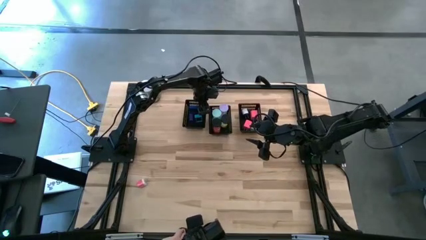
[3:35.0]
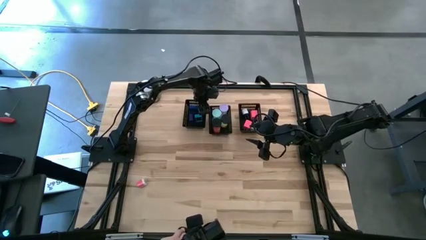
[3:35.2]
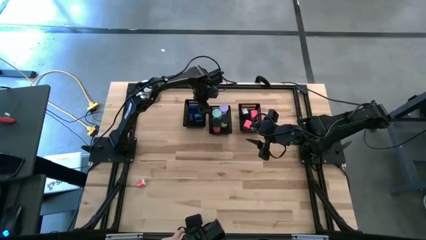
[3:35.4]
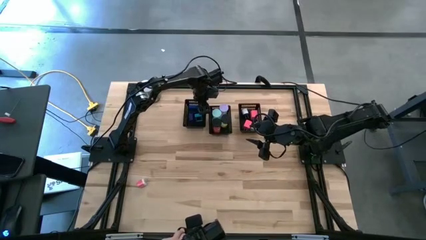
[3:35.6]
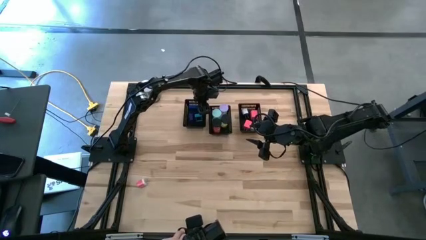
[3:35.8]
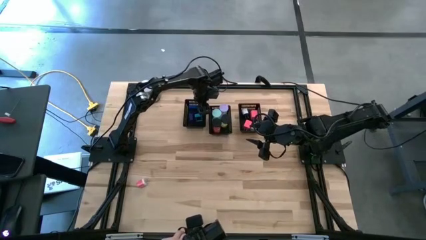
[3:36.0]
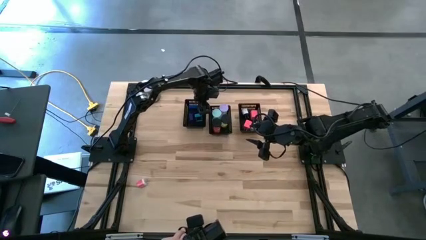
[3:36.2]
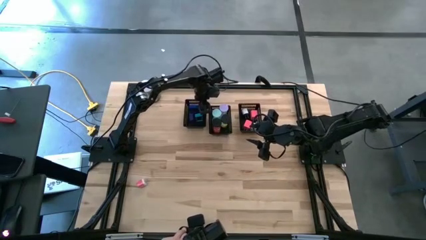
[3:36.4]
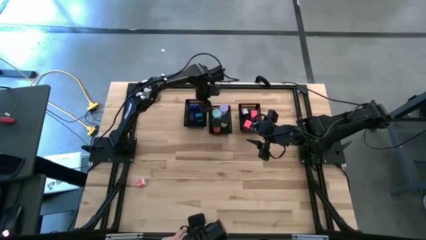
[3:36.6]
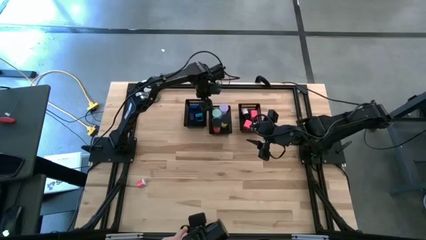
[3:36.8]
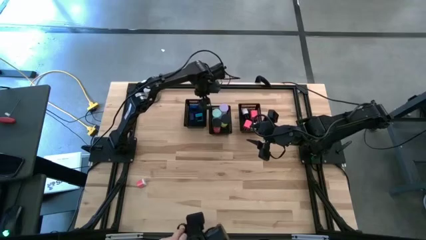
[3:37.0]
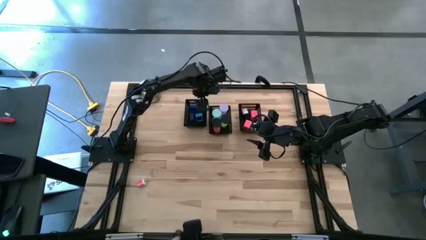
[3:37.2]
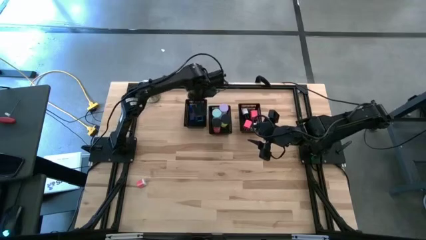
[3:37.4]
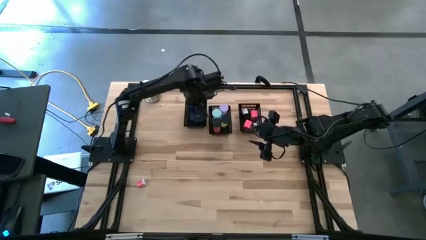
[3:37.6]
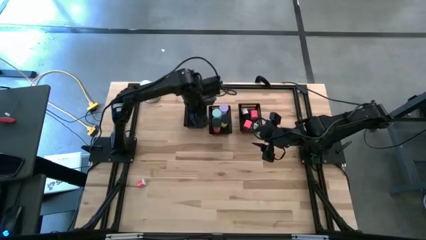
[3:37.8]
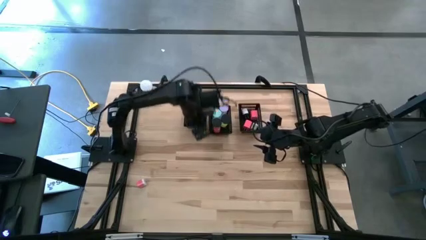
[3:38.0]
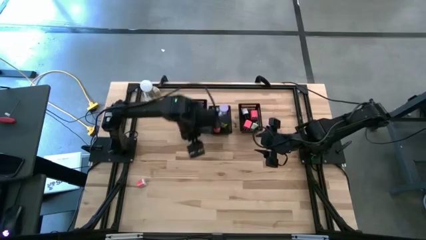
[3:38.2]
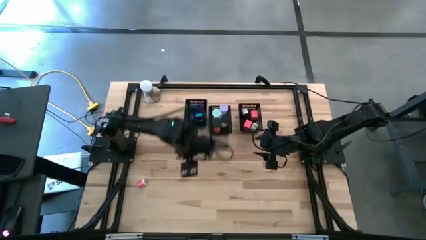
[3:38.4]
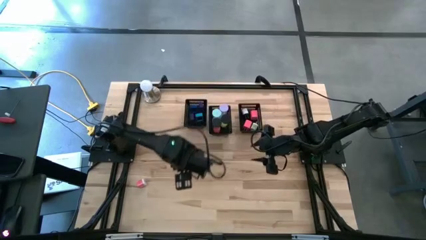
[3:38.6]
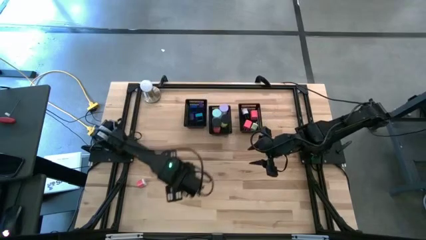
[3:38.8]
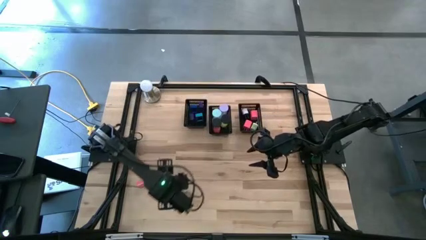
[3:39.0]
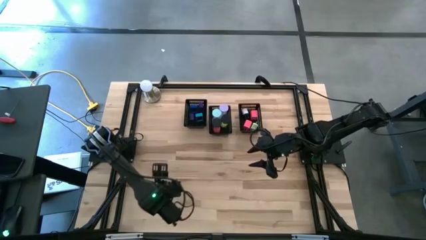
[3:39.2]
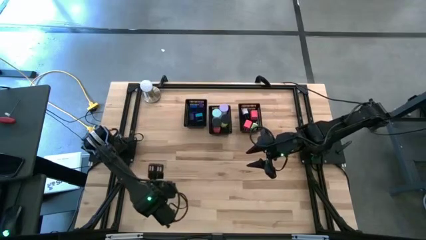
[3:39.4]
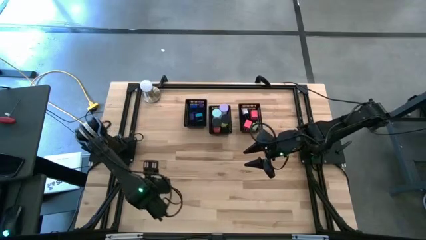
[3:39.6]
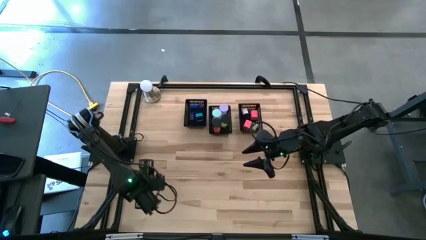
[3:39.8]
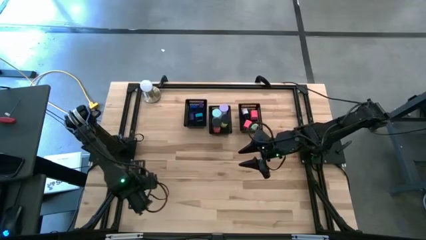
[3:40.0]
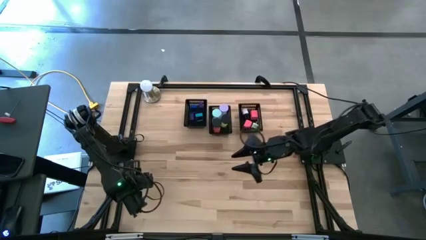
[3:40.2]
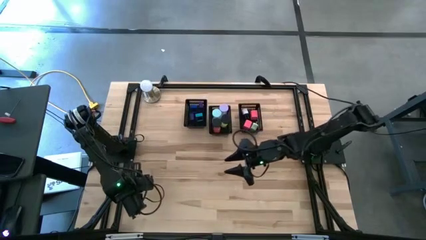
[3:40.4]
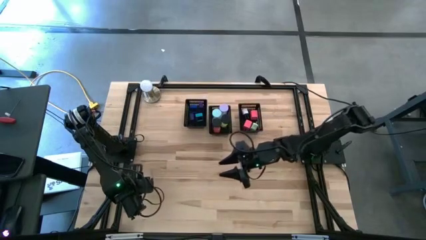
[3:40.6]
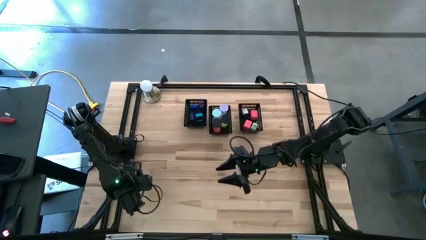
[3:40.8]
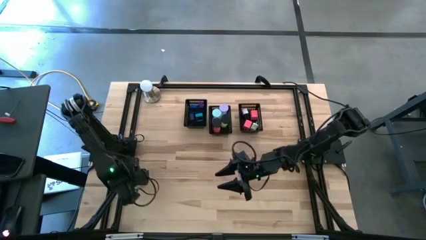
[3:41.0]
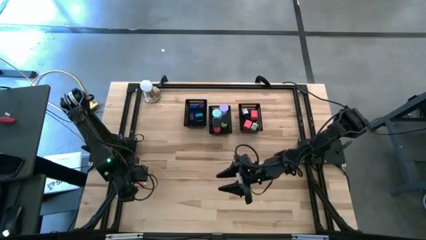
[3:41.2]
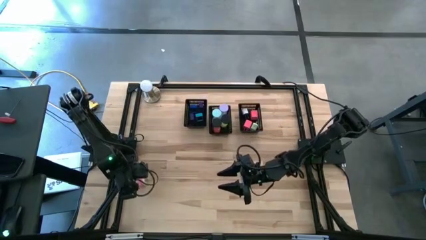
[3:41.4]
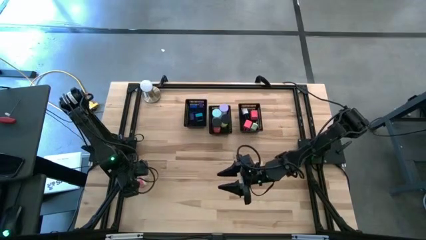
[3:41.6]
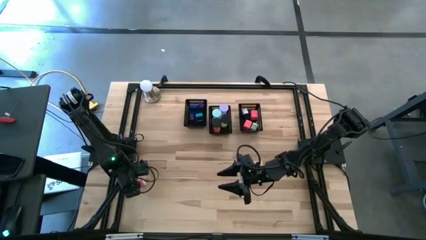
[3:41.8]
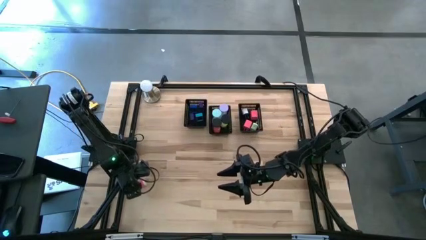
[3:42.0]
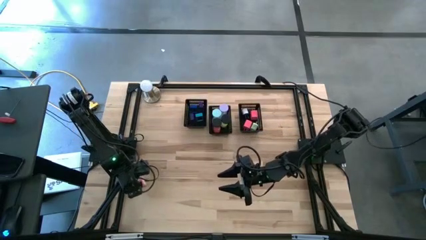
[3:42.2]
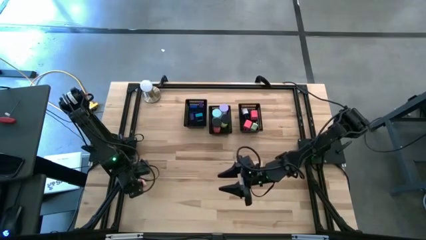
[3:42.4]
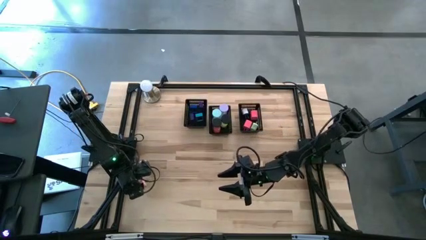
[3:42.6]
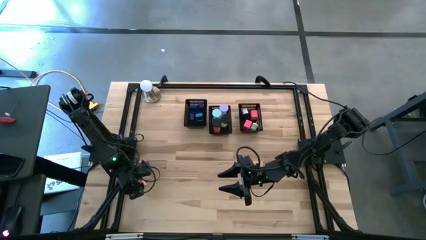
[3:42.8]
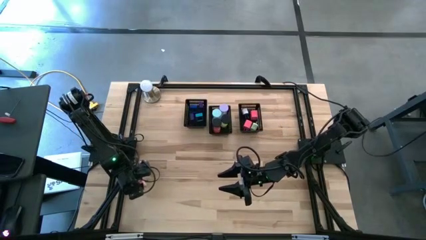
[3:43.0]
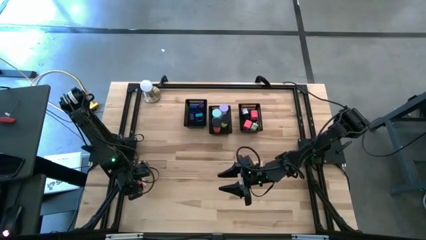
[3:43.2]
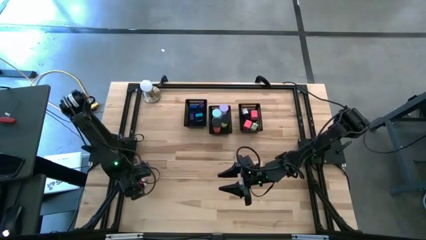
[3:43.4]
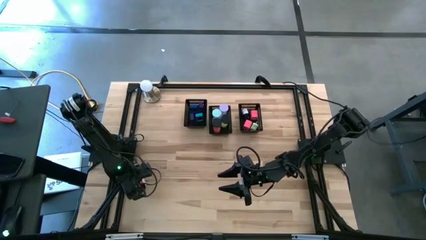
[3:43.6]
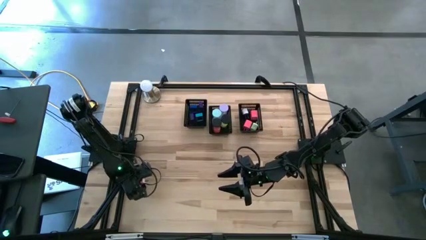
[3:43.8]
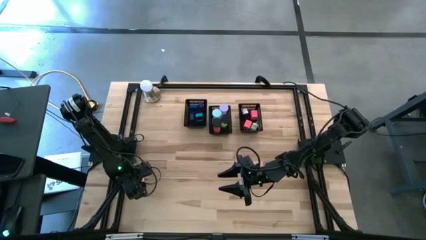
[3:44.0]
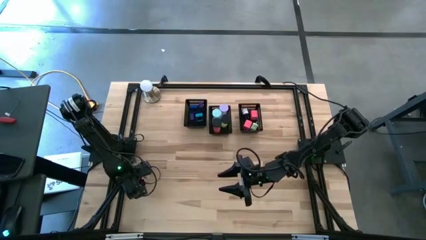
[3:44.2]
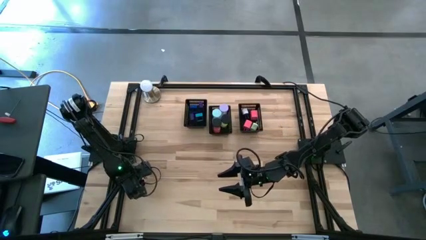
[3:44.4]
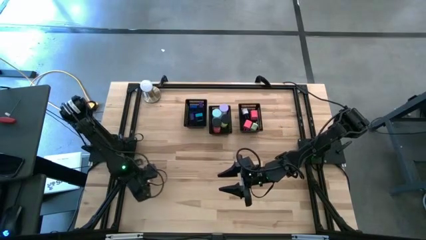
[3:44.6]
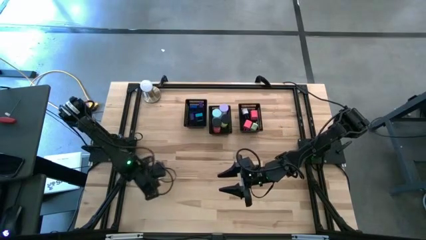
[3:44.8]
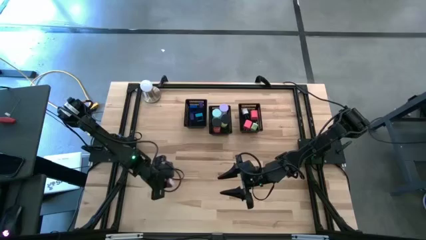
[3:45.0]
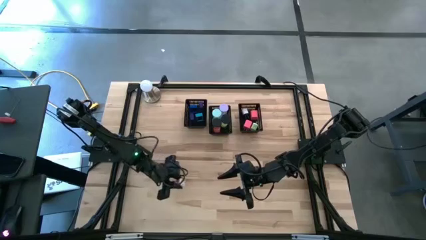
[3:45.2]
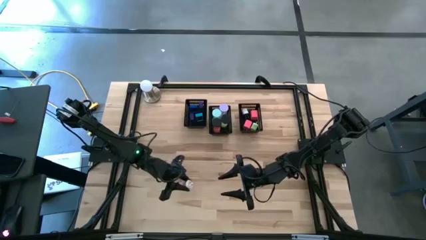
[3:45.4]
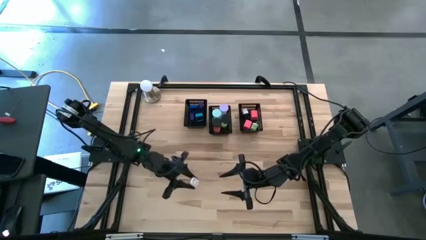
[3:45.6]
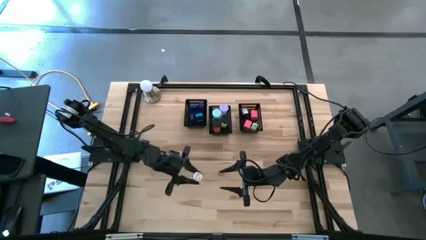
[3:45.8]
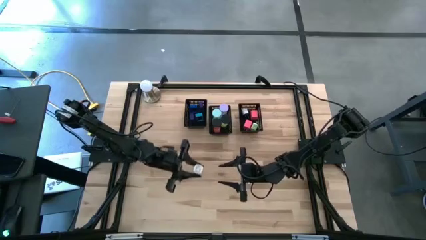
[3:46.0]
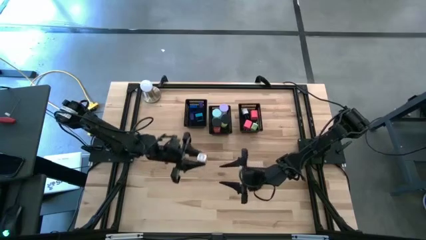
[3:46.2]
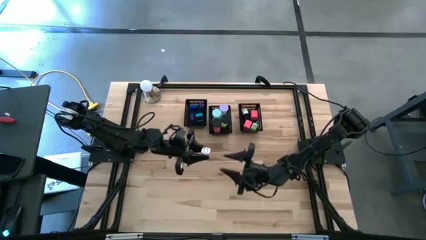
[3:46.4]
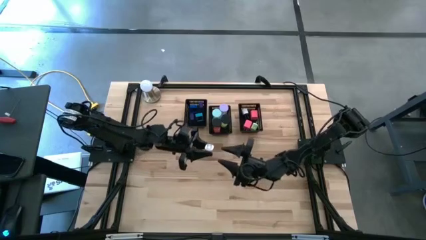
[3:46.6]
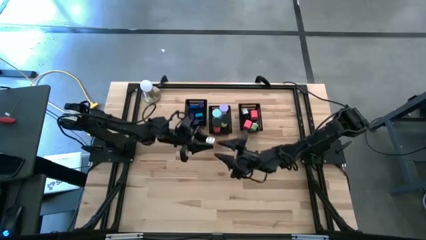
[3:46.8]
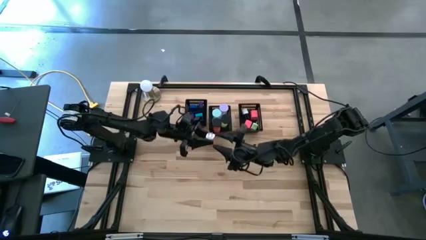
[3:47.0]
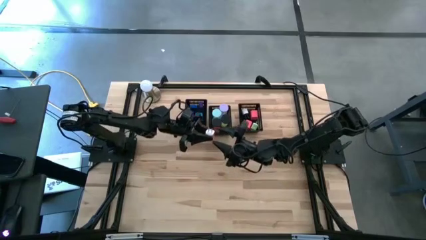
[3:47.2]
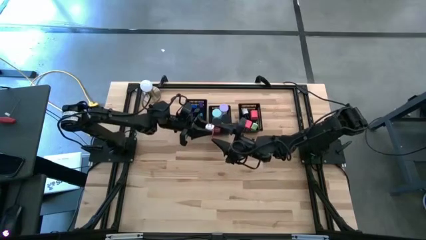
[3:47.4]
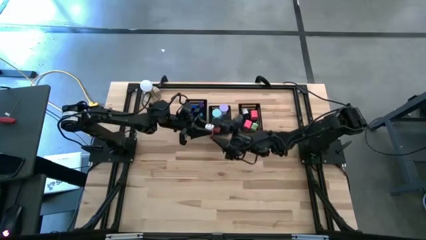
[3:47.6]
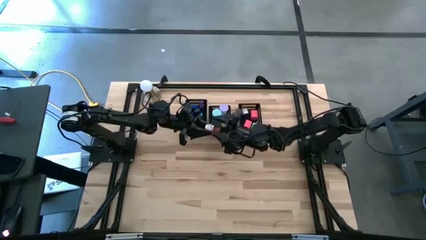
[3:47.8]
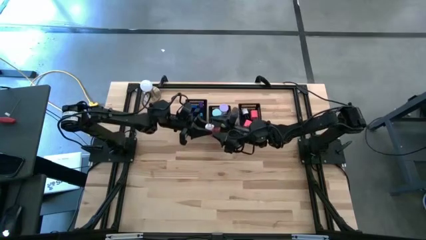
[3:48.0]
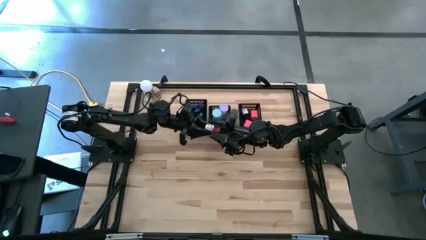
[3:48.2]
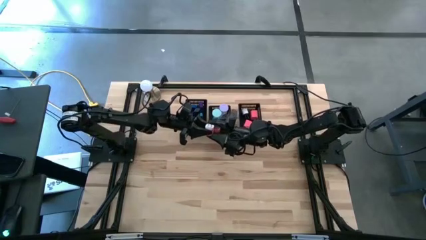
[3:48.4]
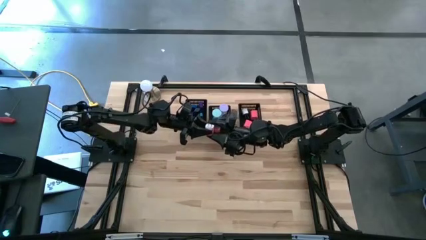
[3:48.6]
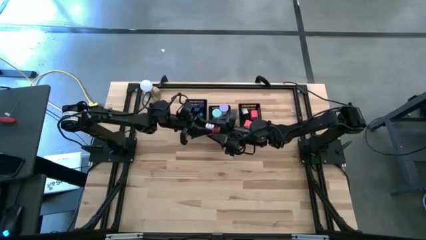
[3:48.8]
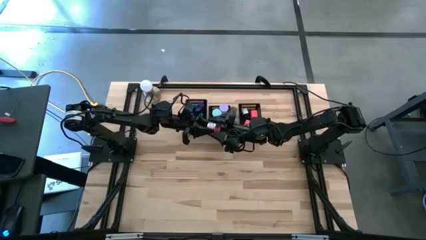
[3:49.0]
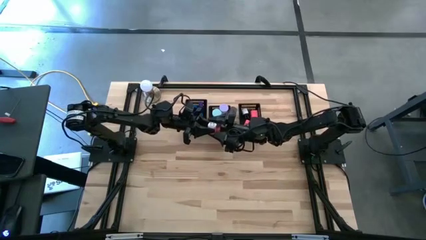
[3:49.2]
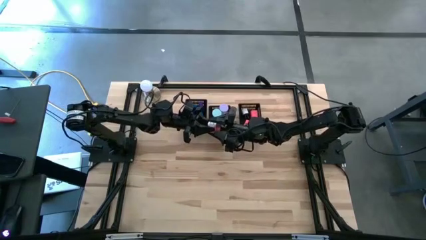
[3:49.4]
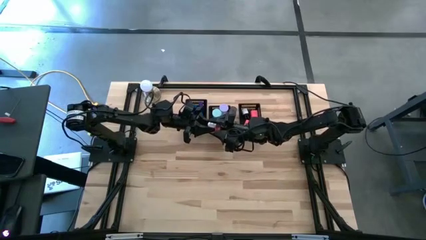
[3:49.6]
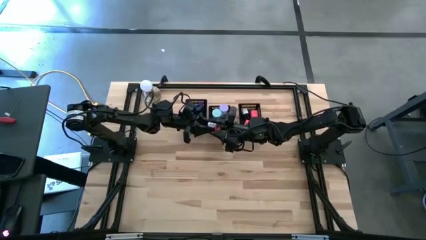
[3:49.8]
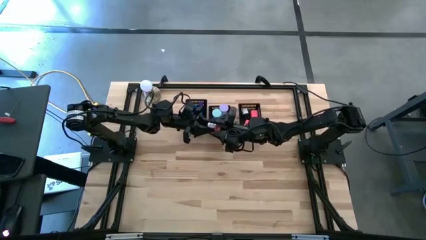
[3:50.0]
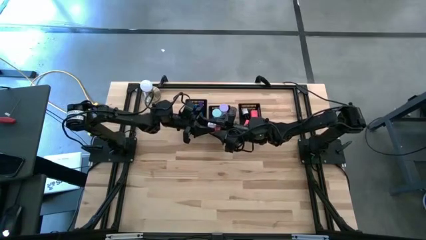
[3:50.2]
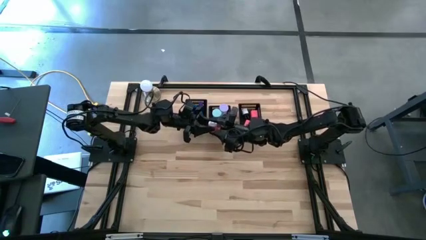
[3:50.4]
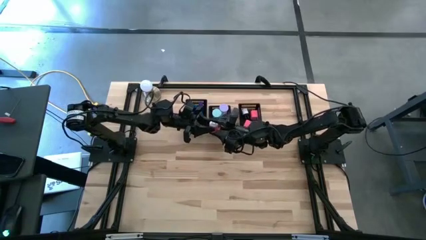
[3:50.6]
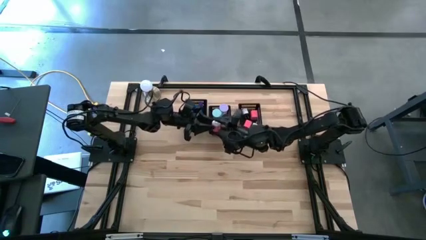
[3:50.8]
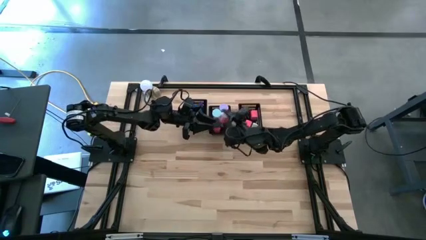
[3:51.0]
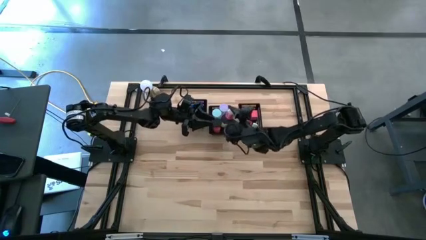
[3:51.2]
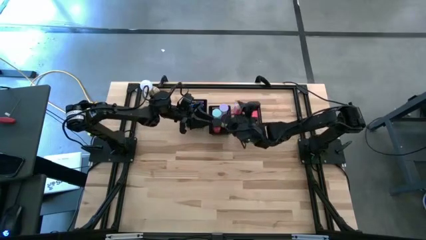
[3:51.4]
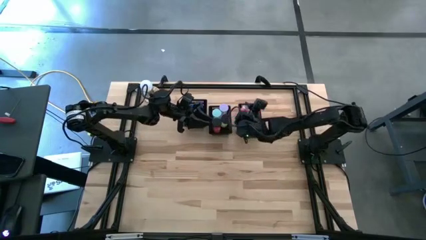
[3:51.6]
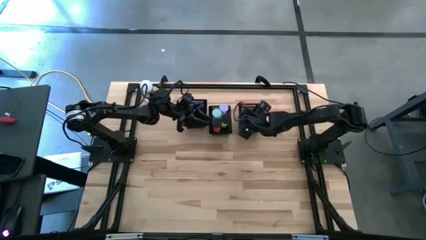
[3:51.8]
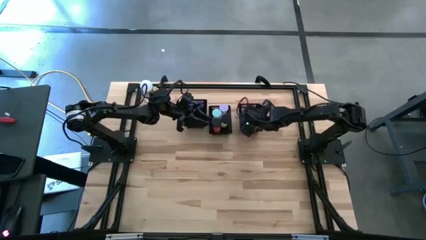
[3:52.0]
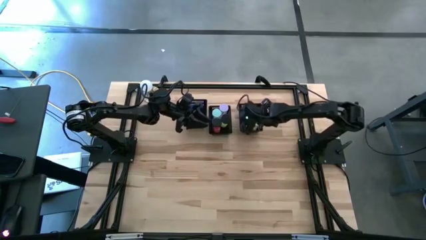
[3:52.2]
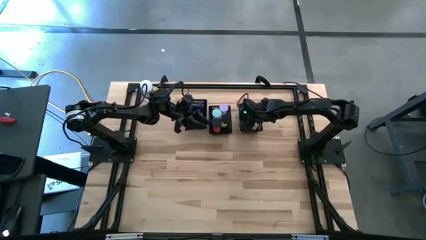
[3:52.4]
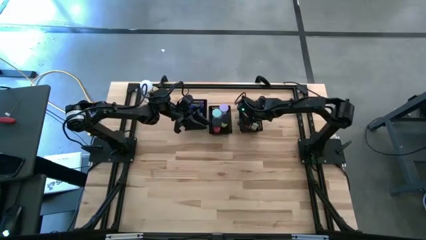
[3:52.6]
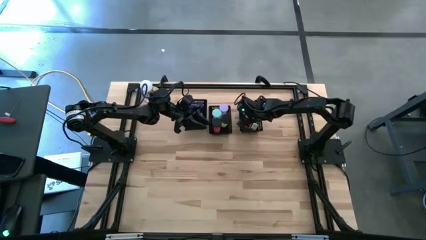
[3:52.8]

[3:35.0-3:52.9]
Task: Pick & Place Office items
Put the pink charger adapter into the right black bin
